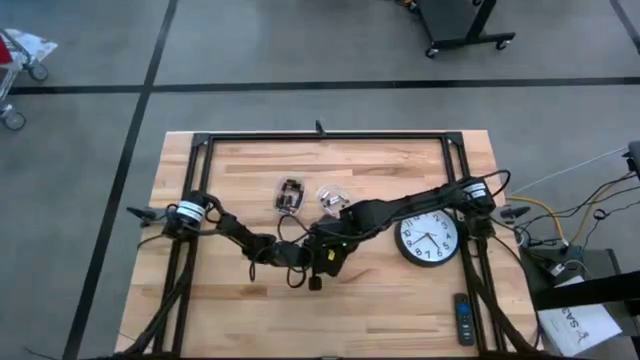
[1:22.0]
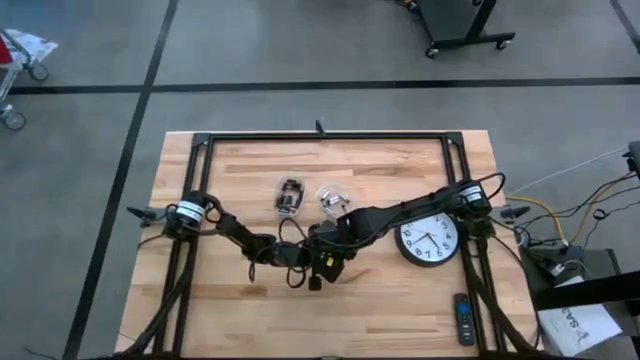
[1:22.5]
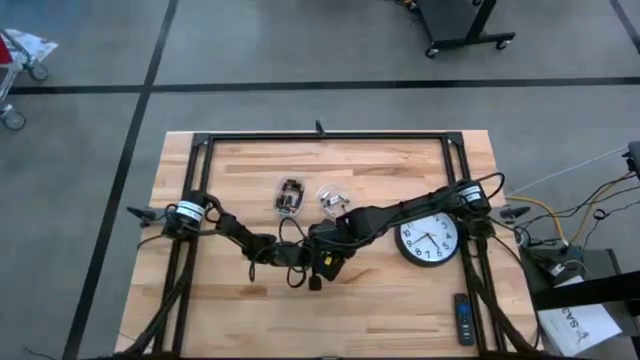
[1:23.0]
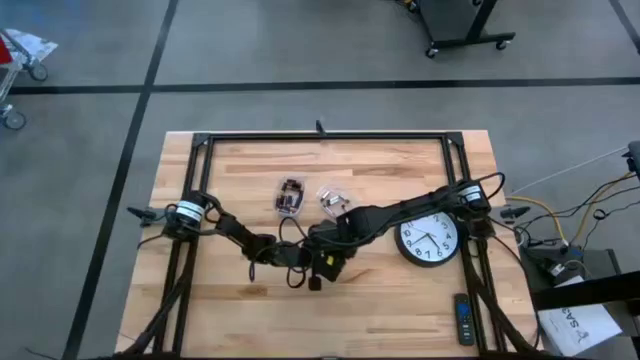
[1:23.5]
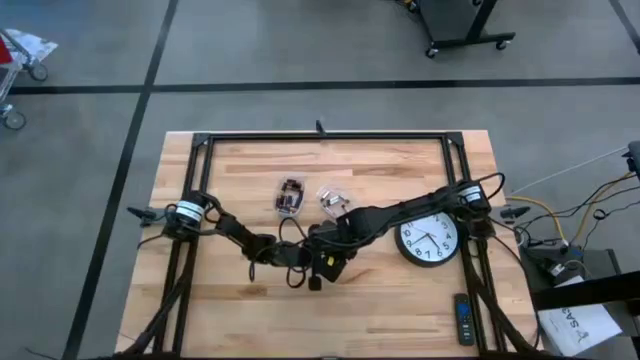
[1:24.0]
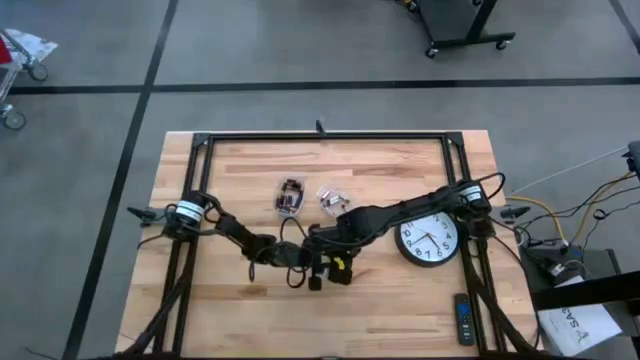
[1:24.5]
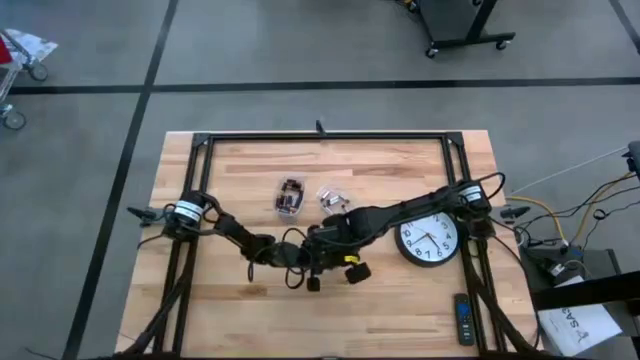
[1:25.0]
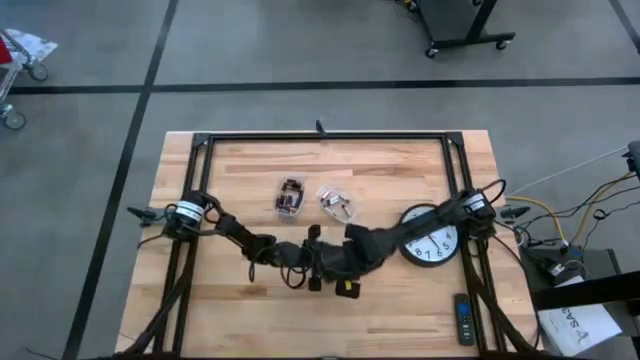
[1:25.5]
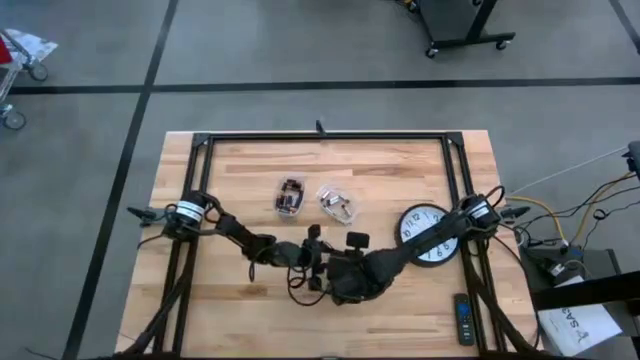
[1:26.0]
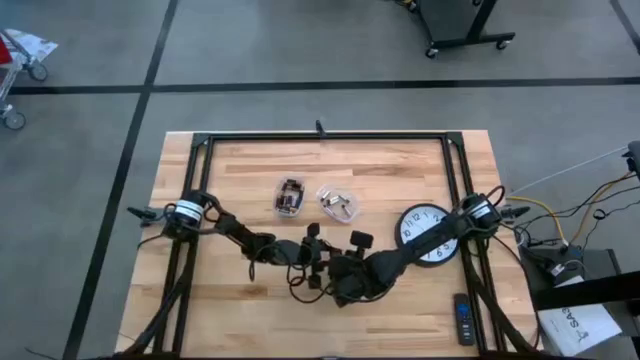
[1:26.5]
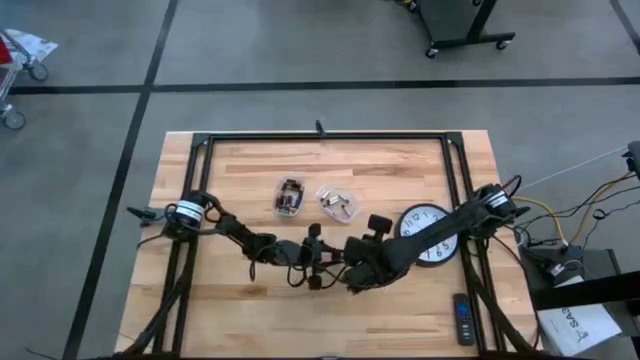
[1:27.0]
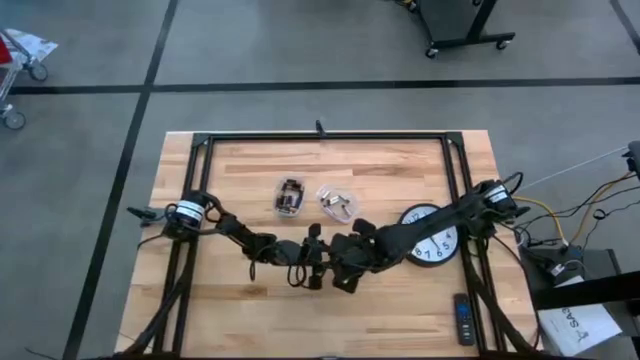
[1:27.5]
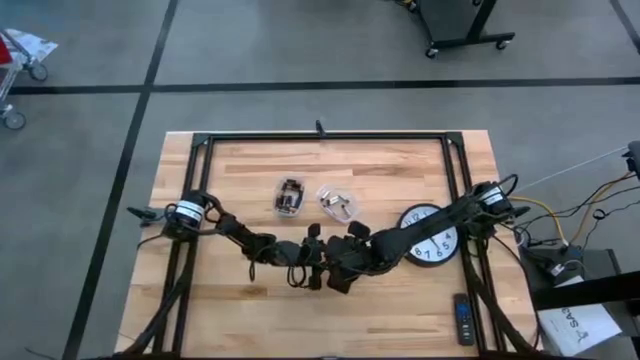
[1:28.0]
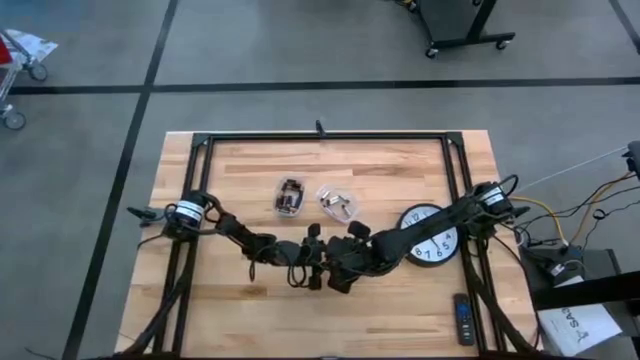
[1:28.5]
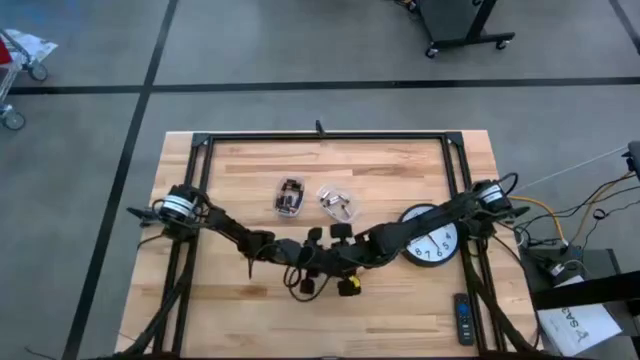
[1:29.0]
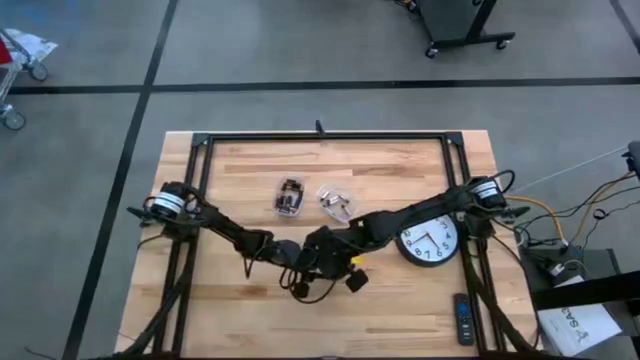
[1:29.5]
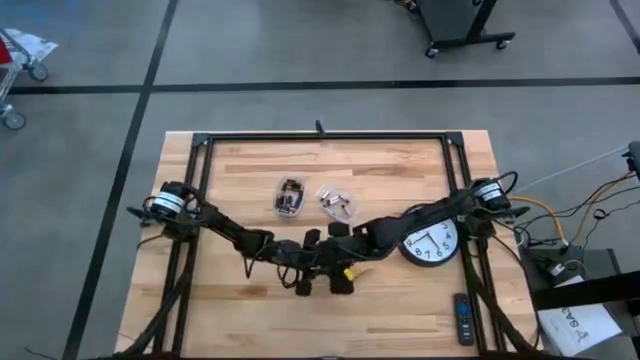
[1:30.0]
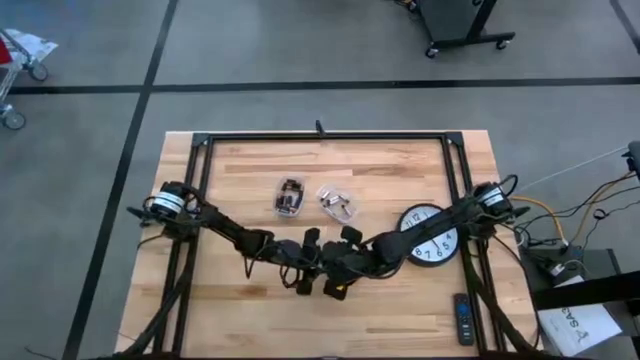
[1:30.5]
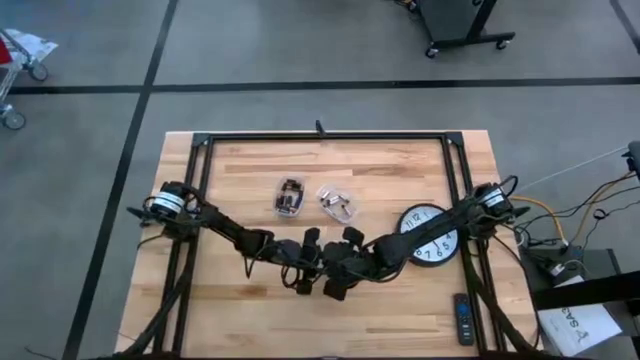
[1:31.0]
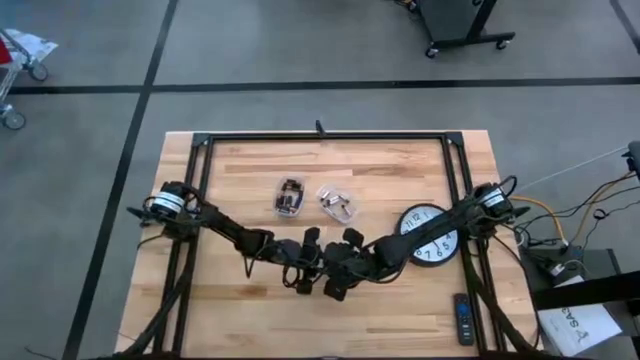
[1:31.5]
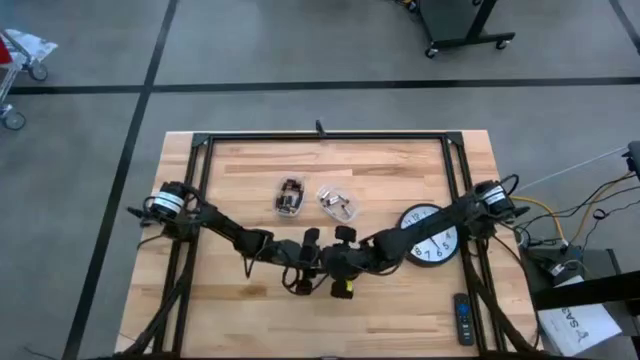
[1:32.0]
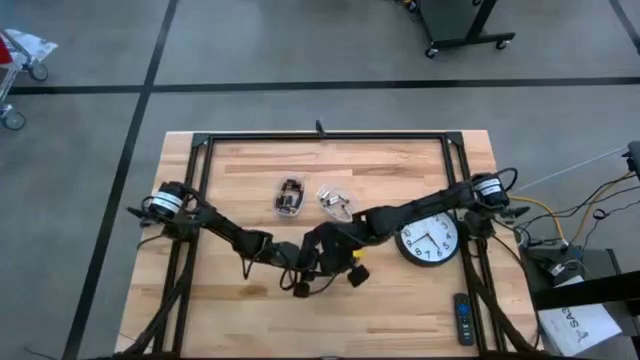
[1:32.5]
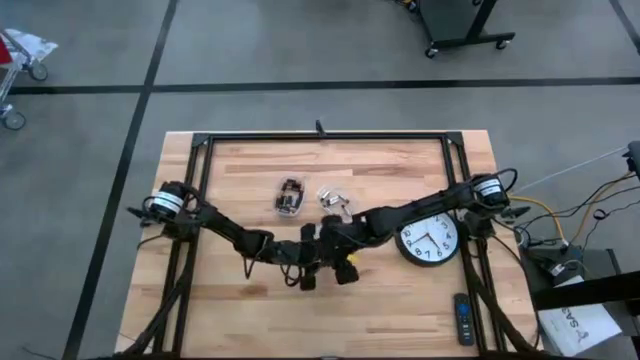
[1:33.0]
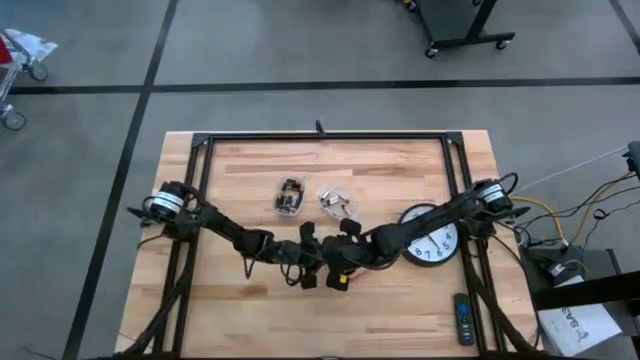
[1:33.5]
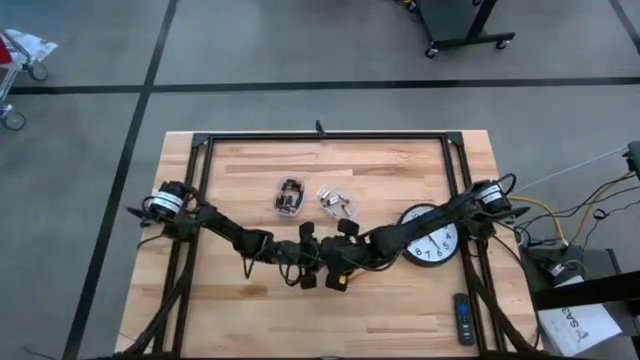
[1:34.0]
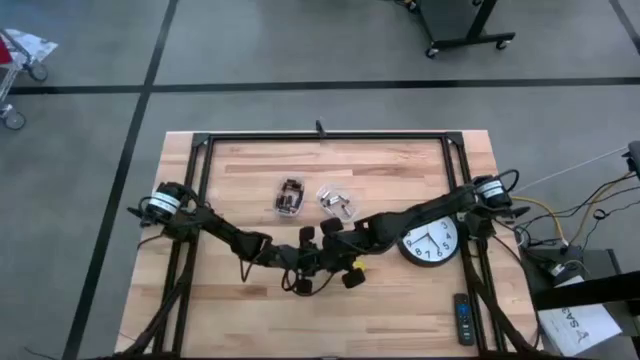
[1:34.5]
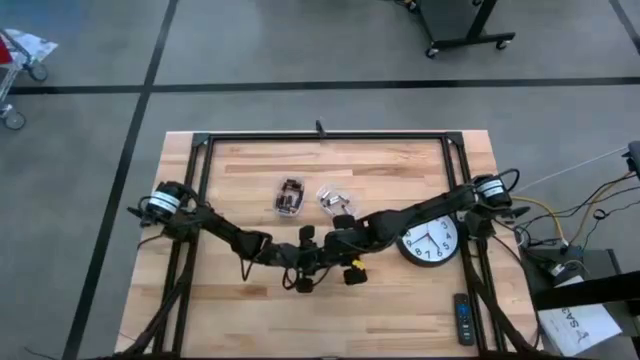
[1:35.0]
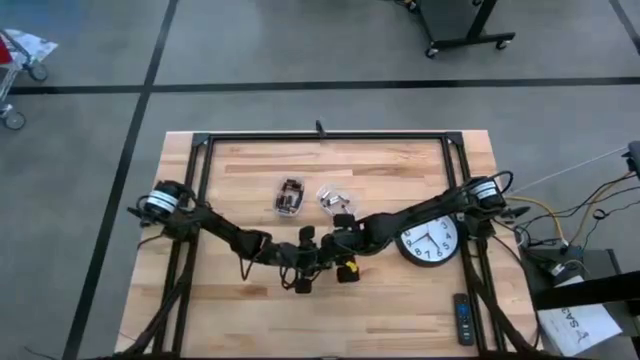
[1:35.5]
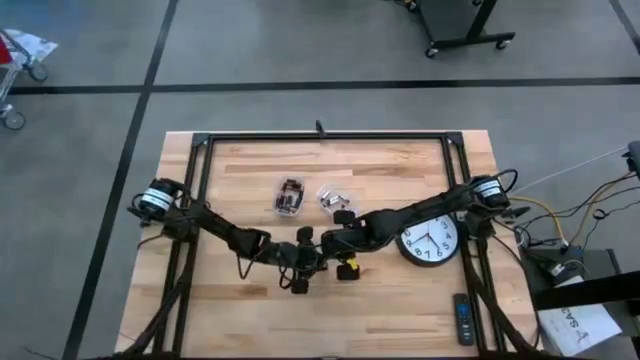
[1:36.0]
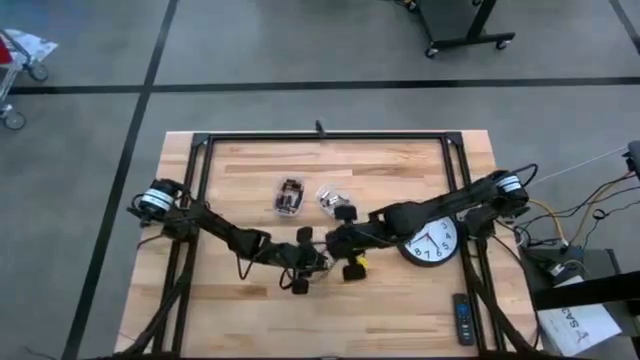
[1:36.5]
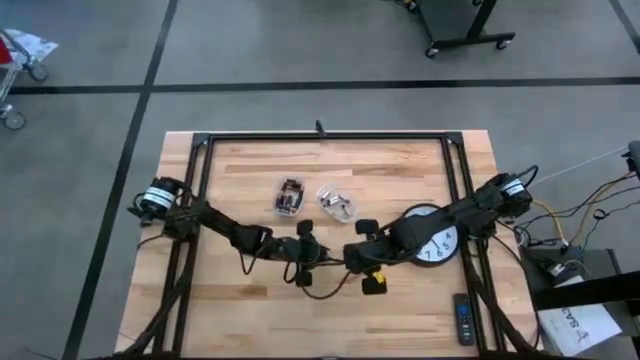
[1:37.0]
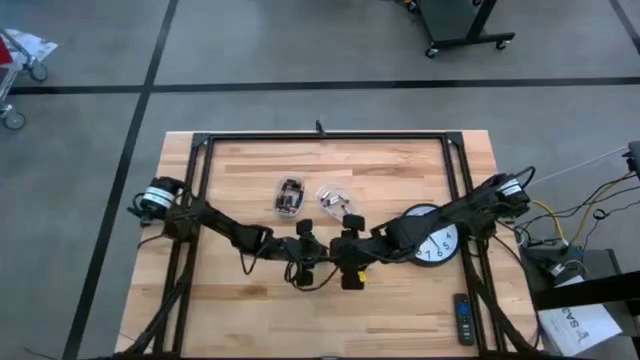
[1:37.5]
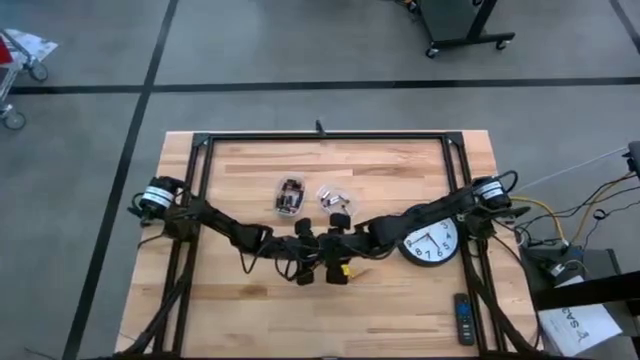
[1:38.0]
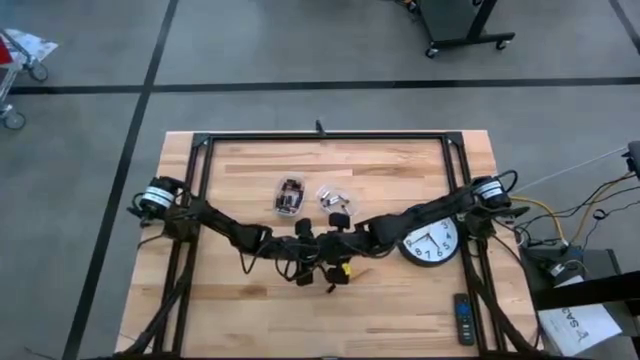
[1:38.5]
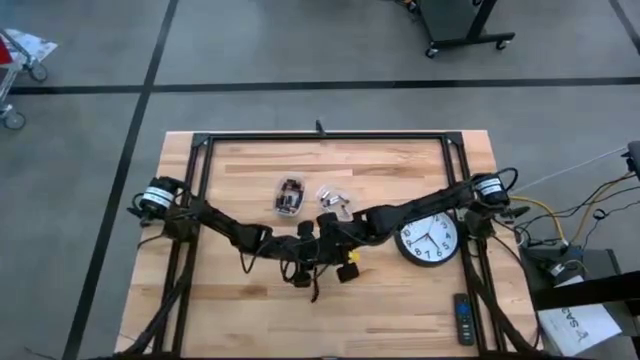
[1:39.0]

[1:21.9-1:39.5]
Task: Insert battery
Open the black flashlight cover

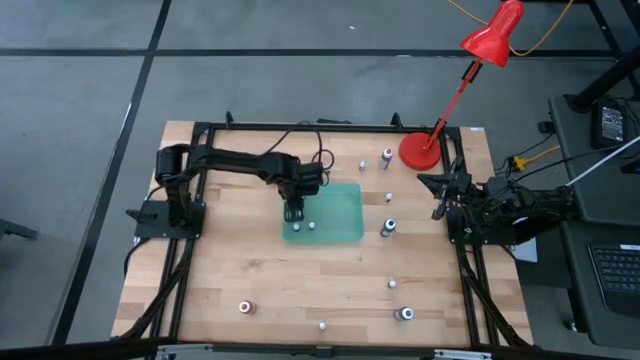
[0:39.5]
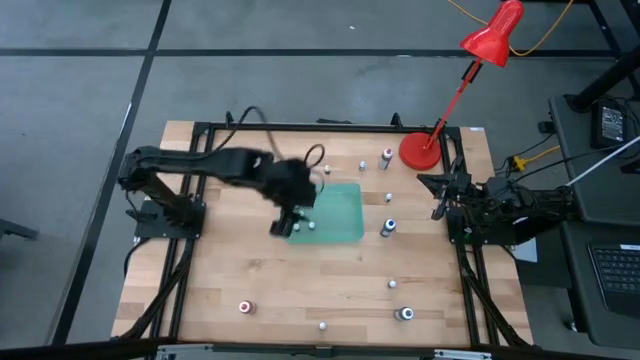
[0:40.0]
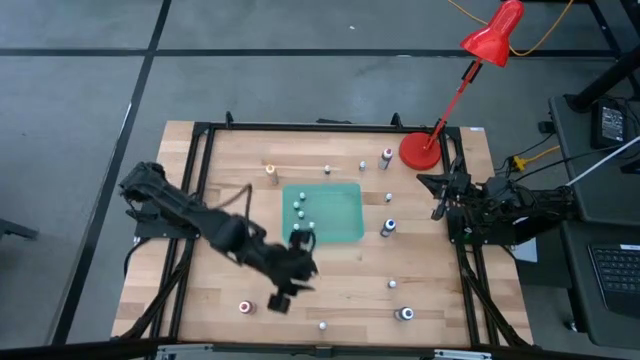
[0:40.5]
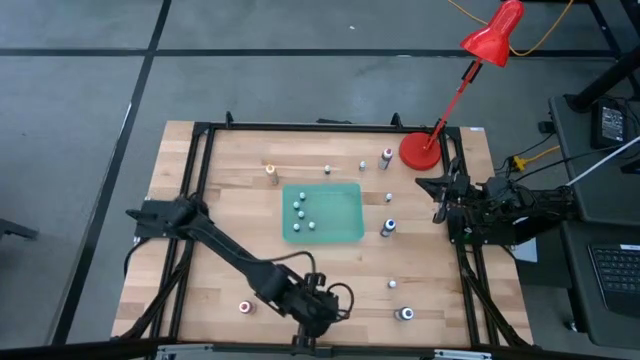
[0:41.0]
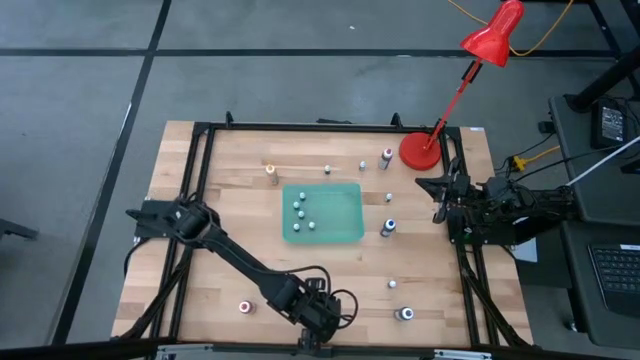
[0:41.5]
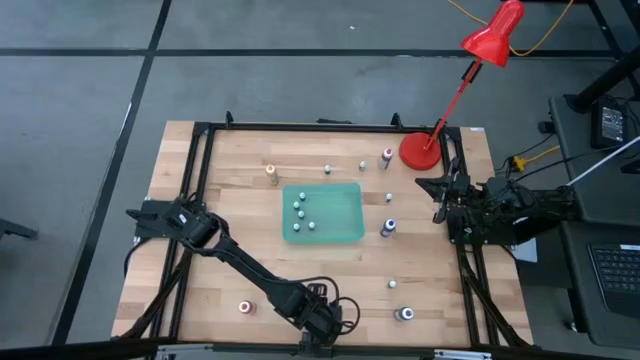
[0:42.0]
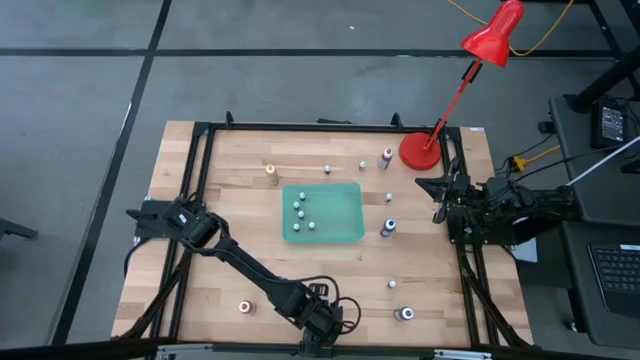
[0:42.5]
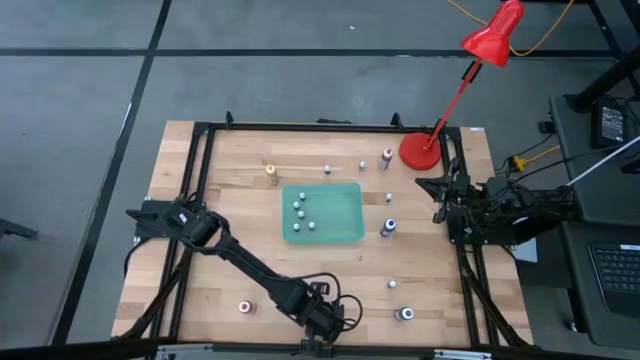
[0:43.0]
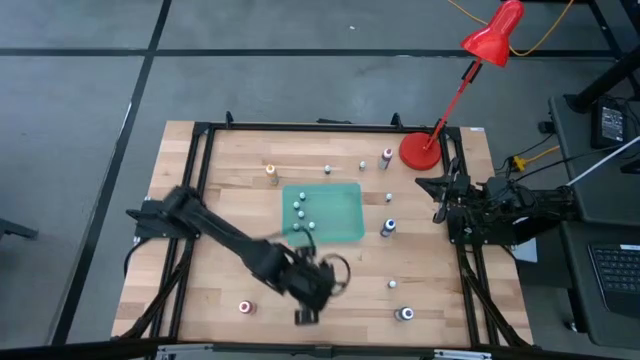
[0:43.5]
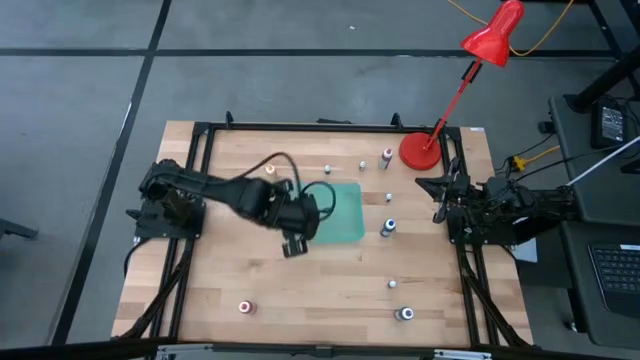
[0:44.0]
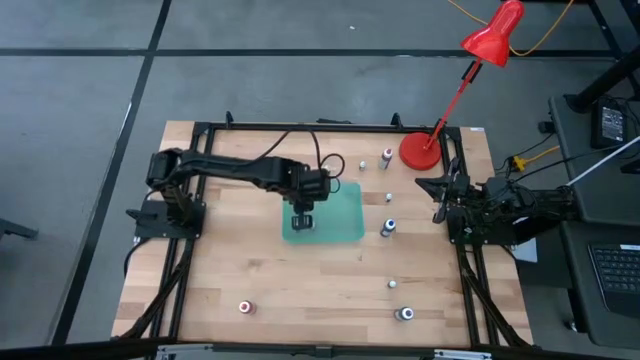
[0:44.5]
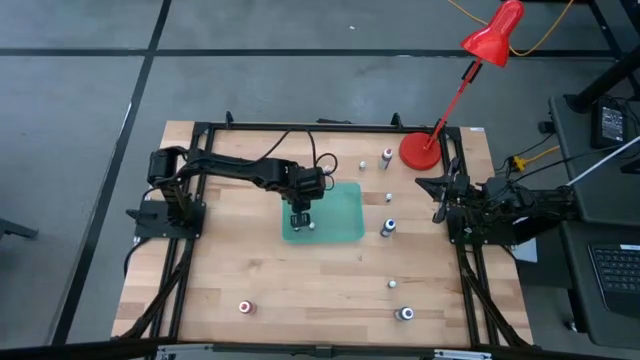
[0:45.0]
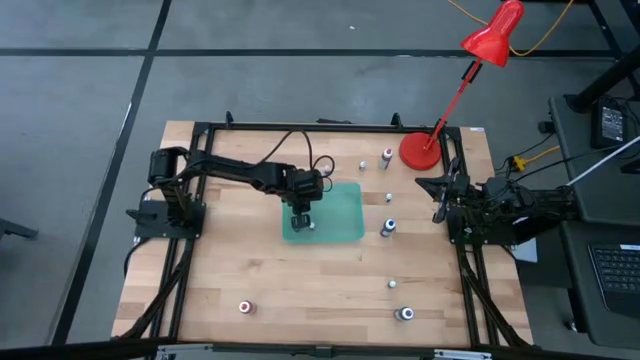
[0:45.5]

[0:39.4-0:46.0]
Task: Pick & Place food coloring
Put the small red food coloring bottle into the green bin
